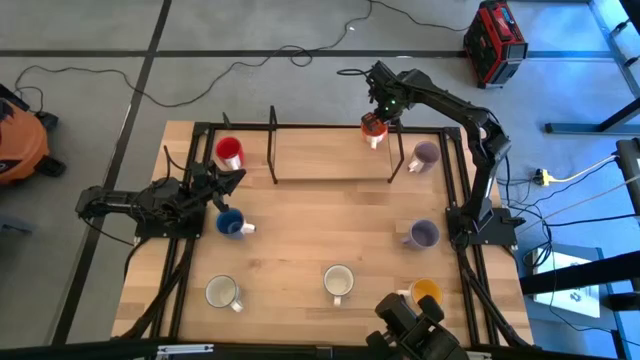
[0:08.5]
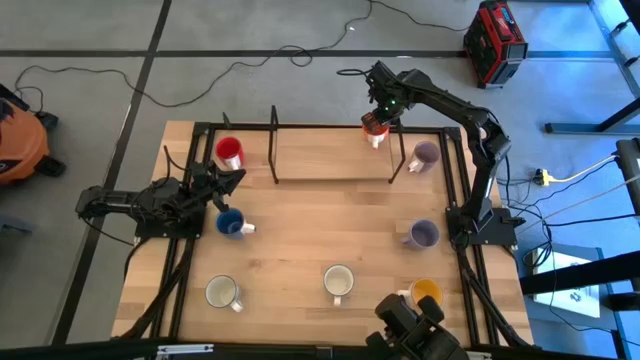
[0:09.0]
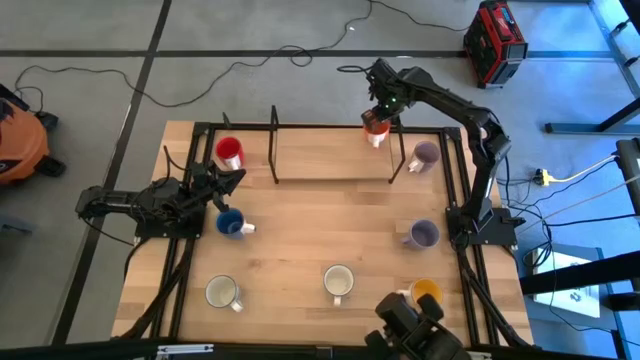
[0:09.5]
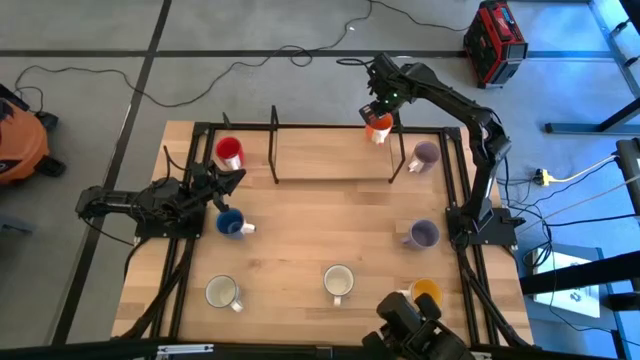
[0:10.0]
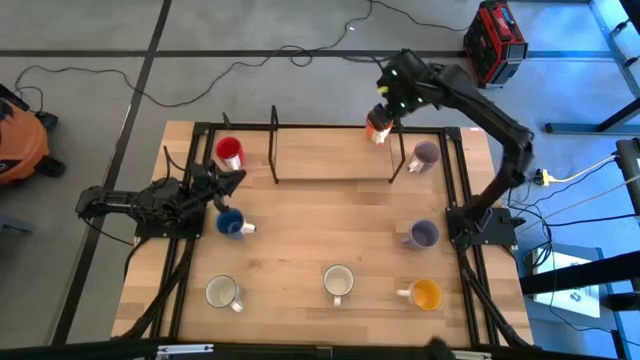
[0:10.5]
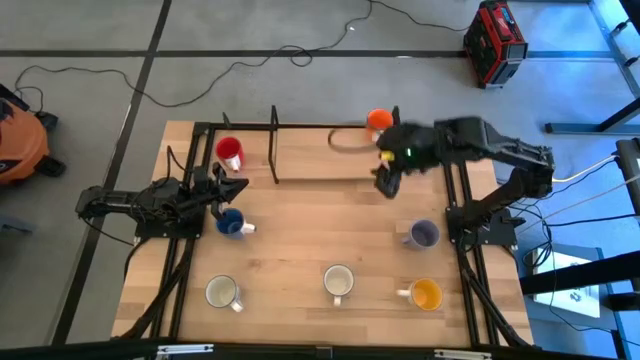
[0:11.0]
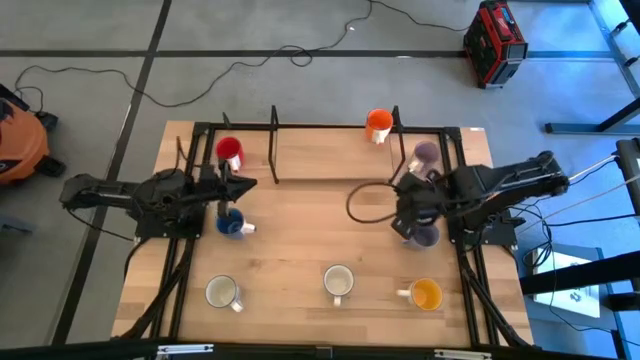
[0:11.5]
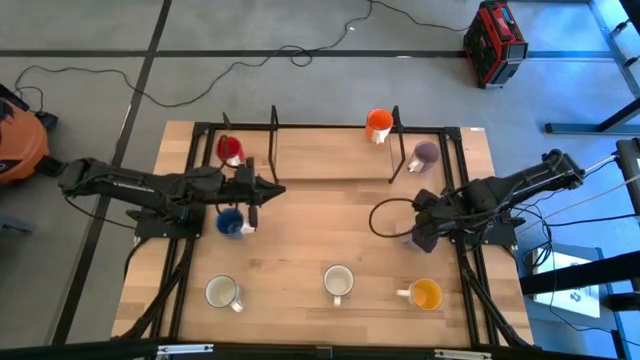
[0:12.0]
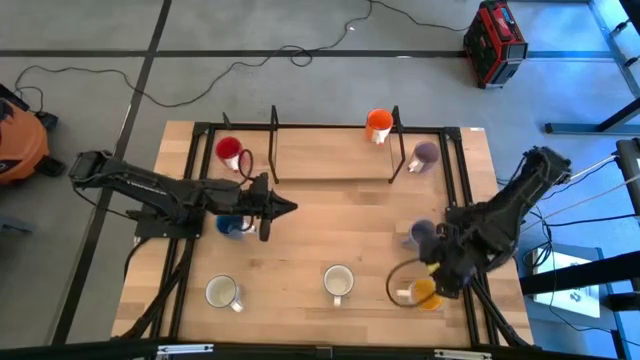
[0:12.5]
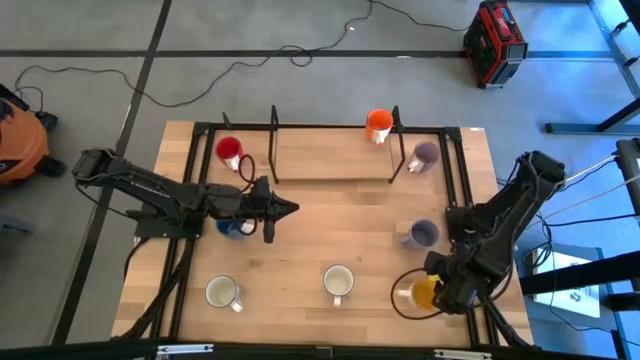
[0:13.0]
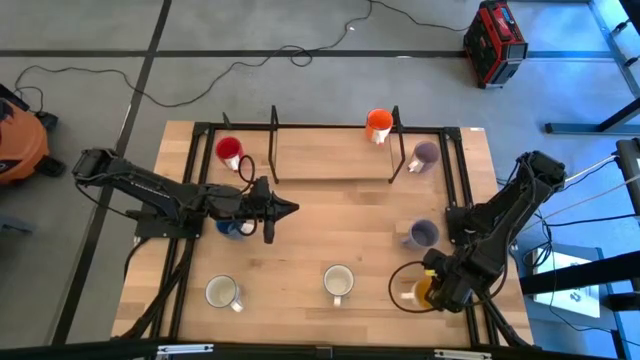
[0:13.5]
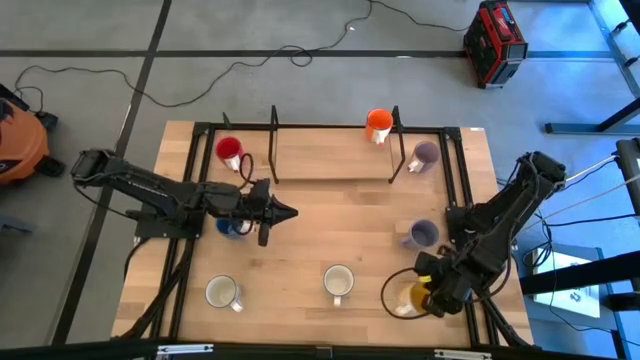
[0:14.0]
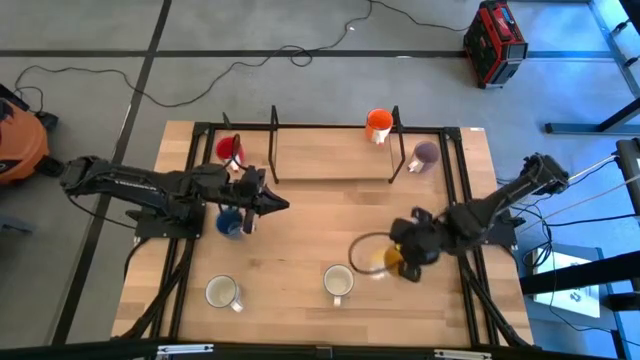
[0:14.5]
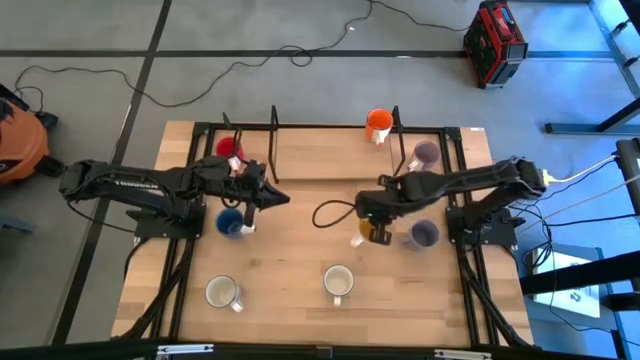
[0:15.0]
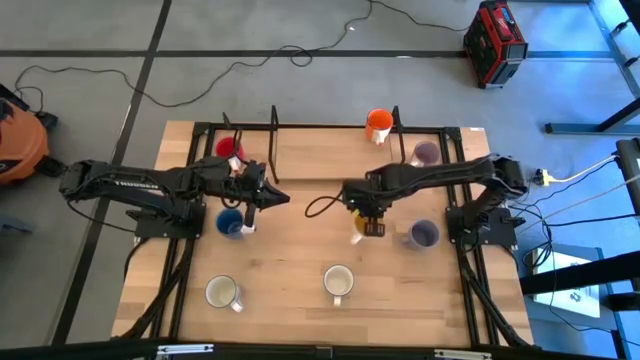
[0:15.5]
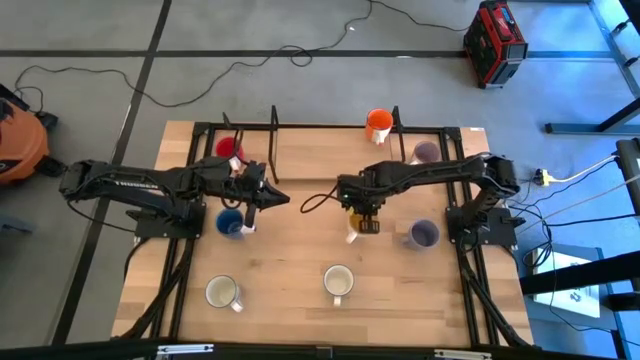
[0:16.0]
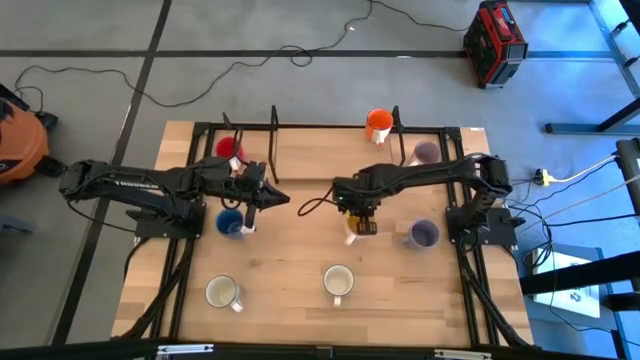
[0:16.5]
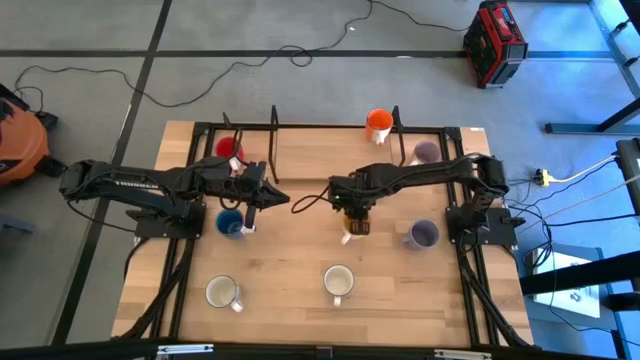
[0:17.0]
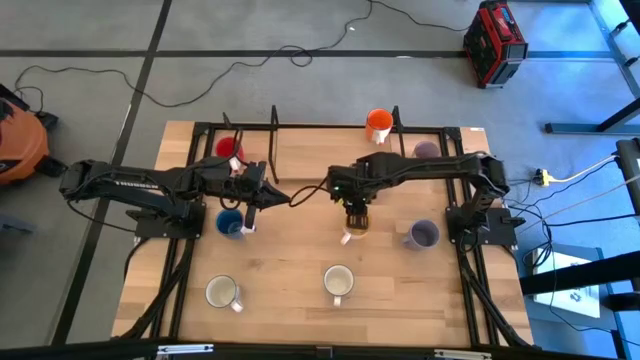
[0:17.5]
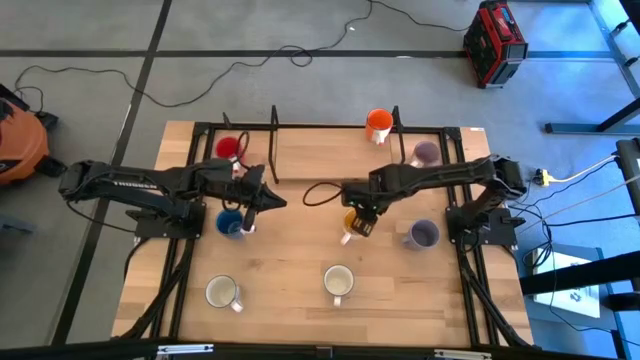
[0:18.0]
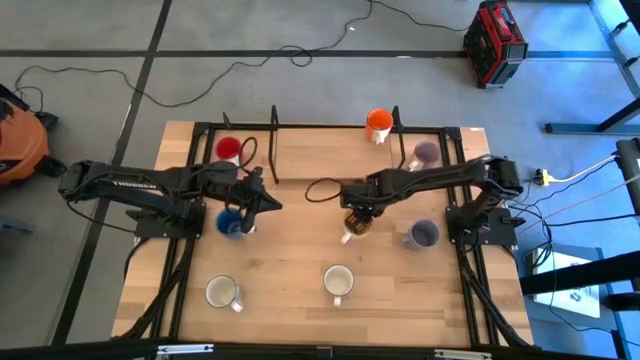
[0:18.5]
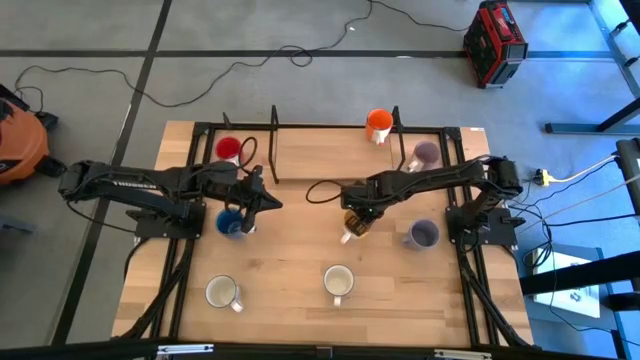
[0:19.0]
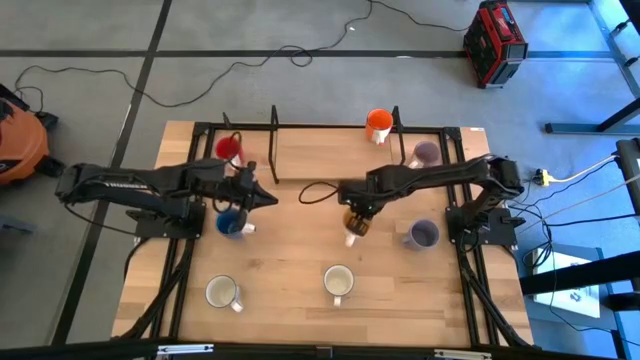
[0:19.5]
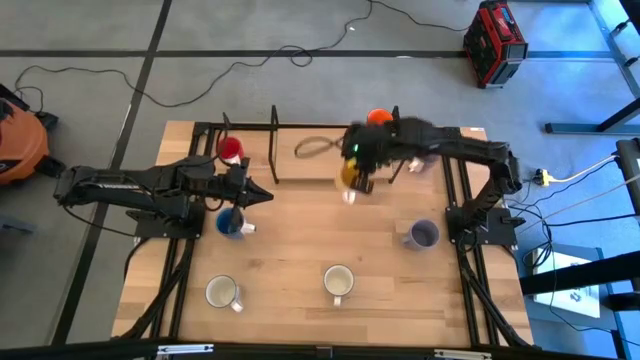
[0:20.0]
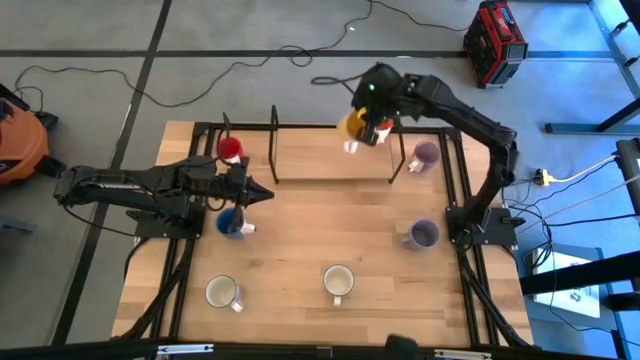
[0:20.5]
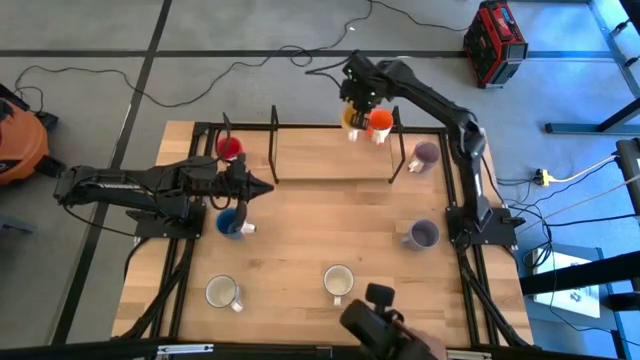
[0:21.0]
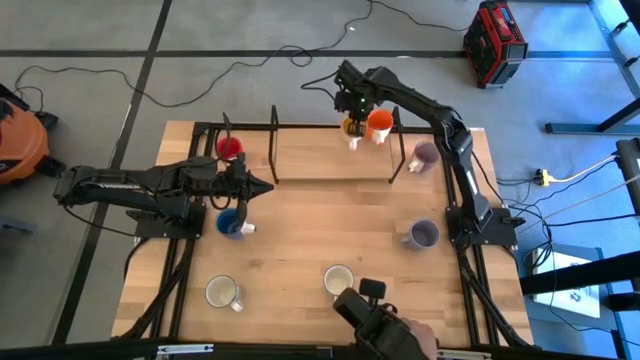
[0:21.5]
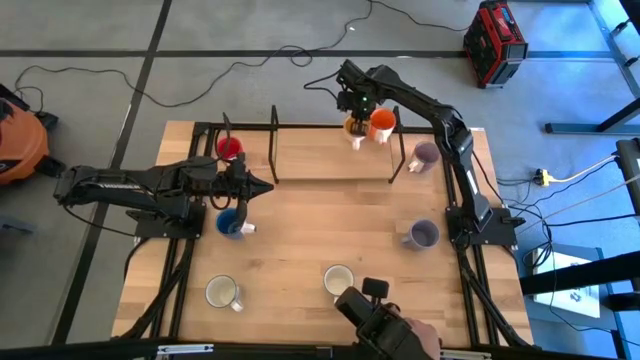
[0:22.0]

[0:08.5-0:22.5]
Task: Place coffee mugs
Put the yellow mug on the shelf

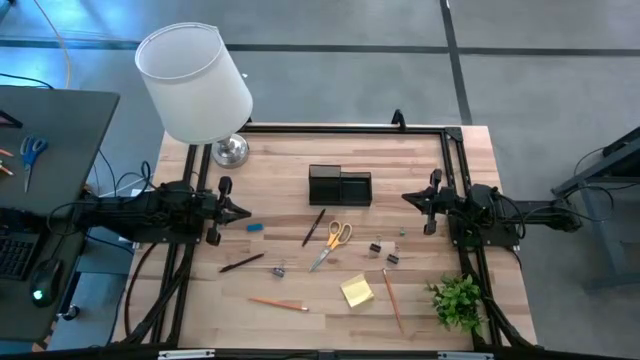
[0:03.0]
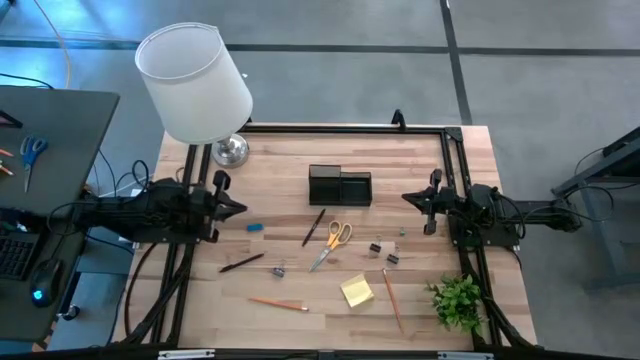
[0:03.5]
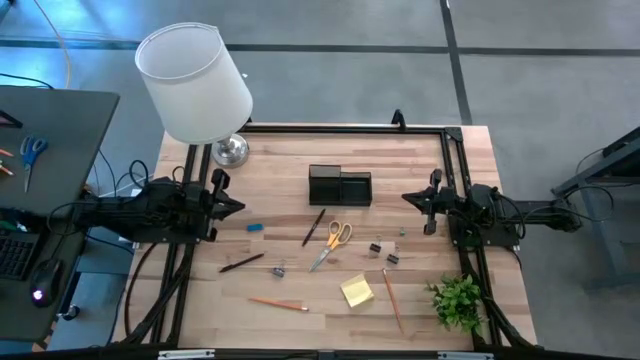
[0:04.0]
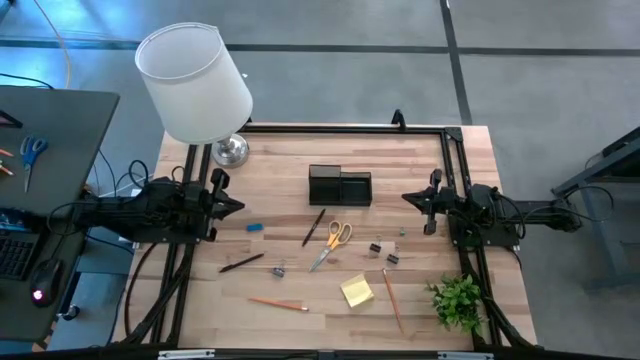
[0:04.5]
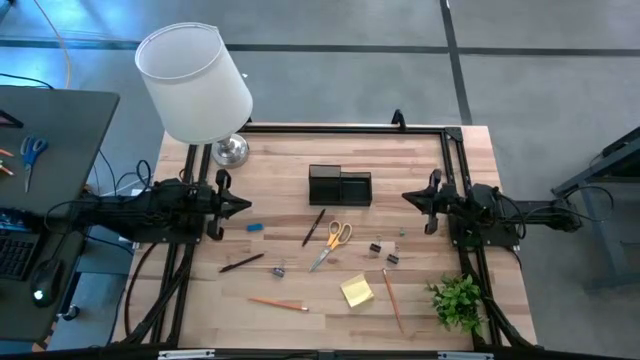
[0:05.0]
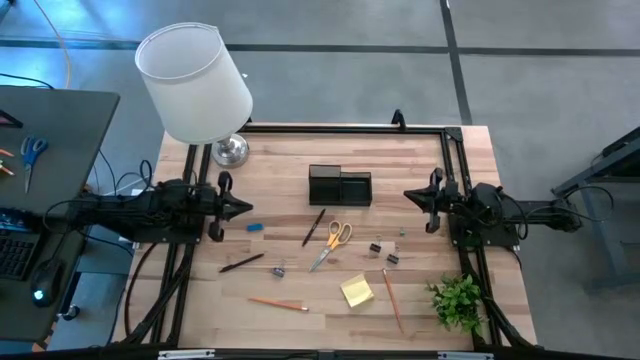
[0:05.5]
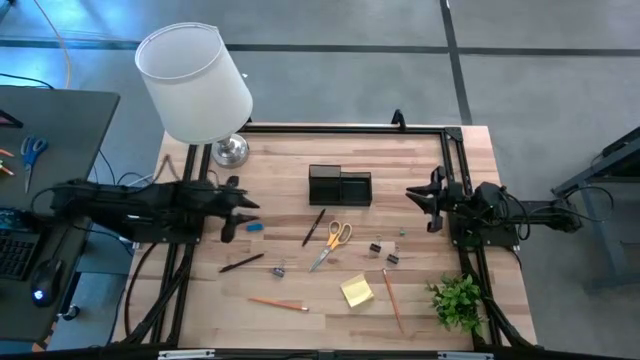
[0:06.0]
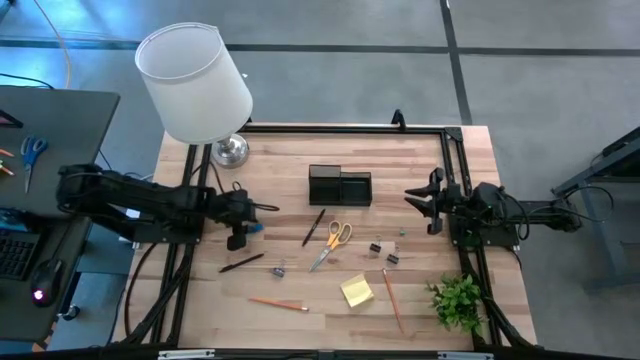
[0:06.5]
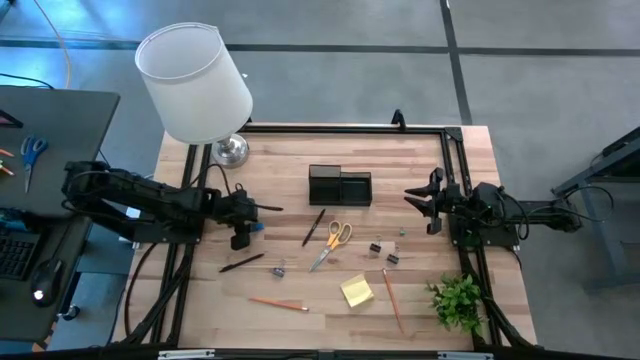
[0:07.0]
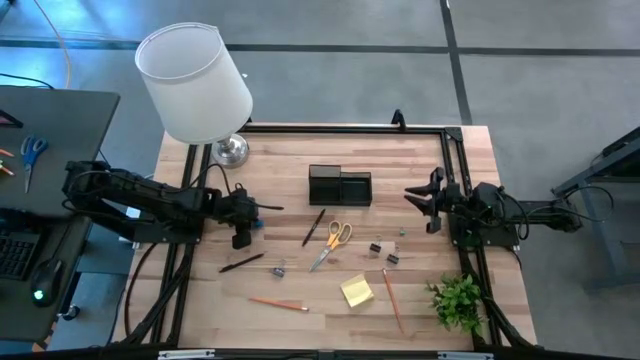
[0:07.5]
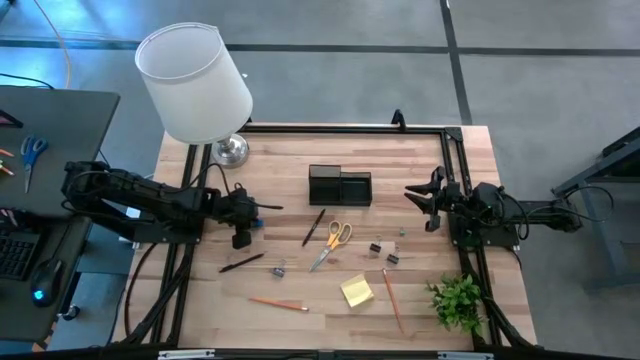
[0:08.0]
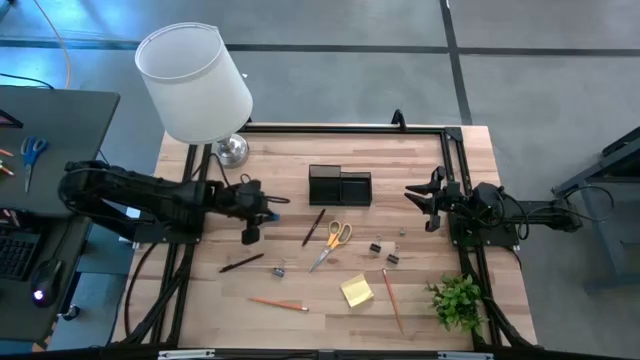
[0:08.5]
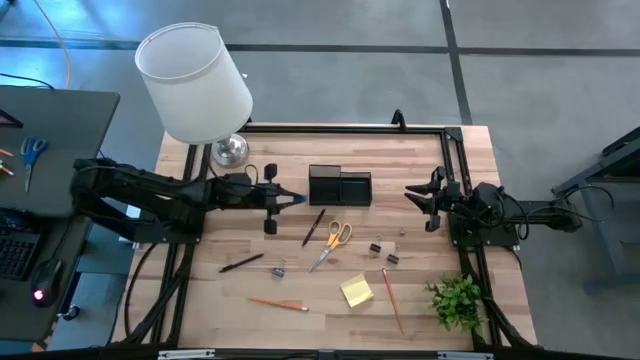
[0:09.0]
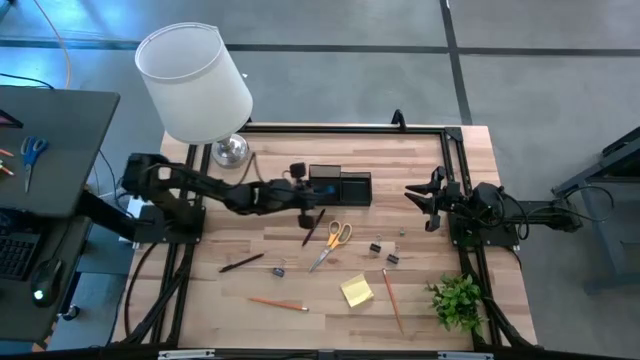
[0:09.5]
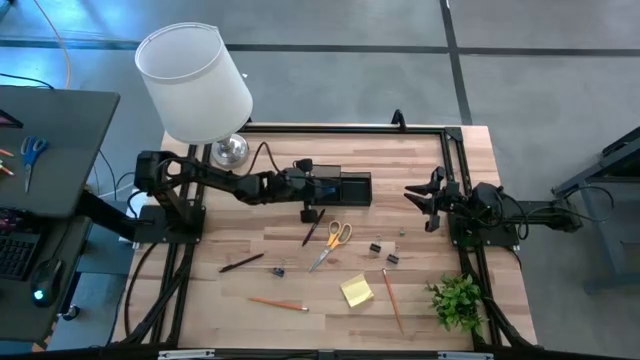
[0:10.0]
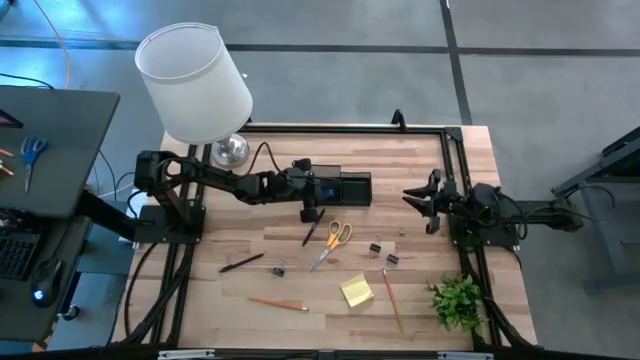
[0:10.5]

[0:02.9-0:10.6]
Task: Pick and place office supplies into organizer
Put the blue eraser into the black desk organizer
